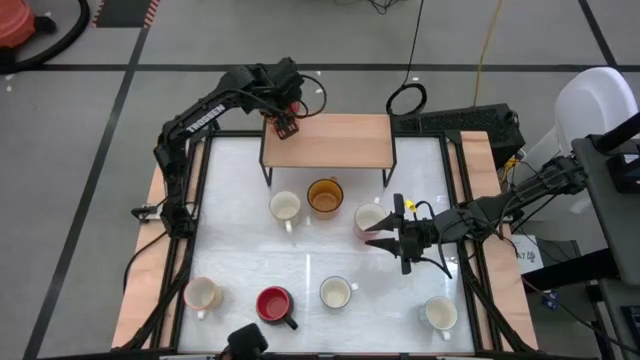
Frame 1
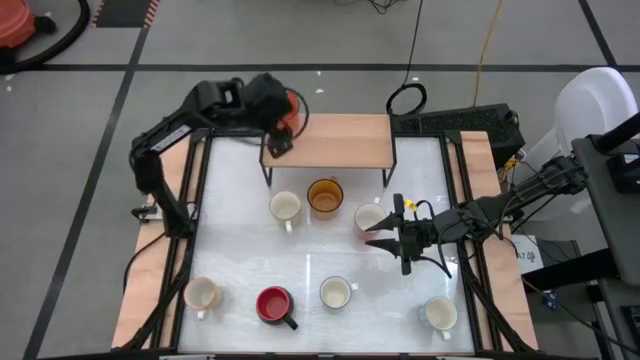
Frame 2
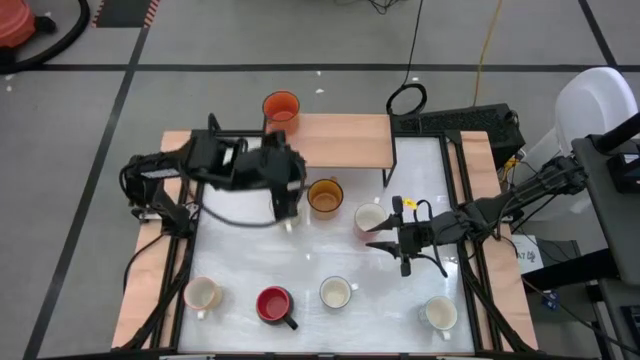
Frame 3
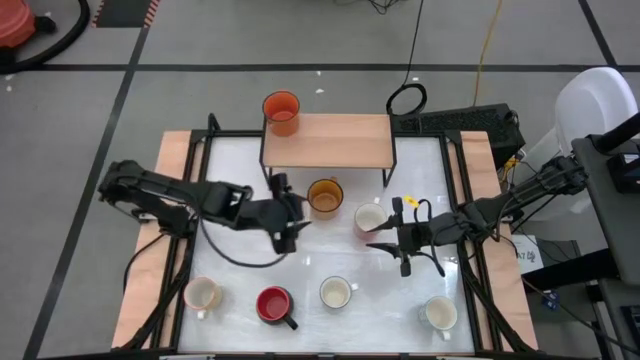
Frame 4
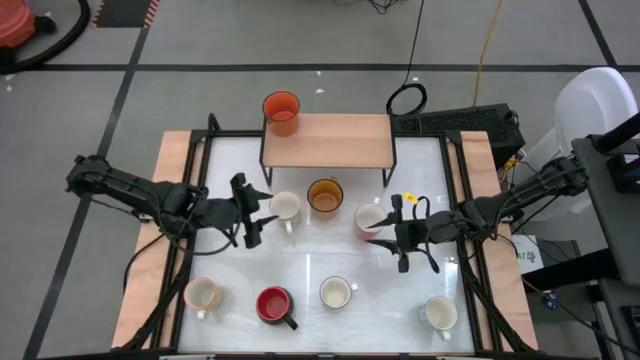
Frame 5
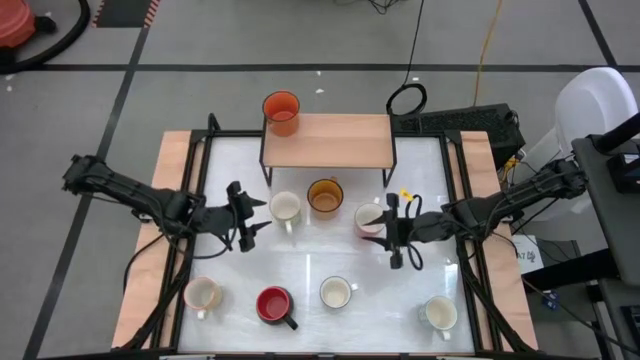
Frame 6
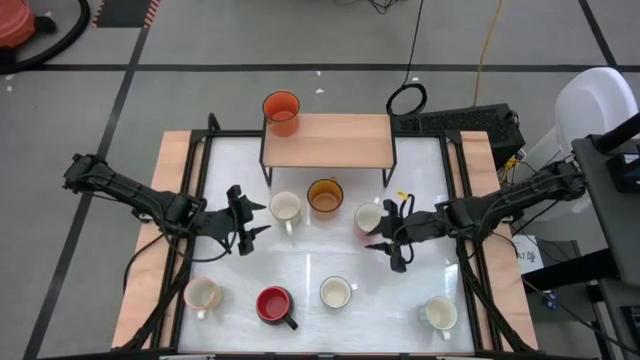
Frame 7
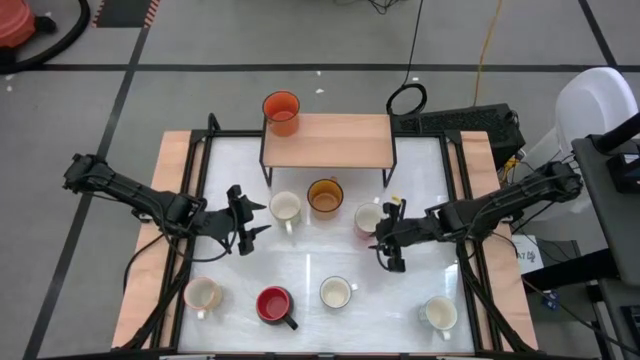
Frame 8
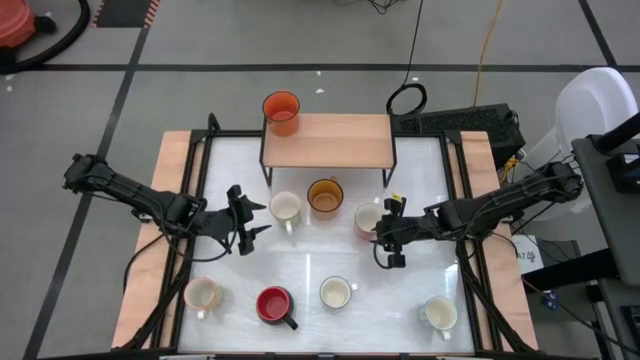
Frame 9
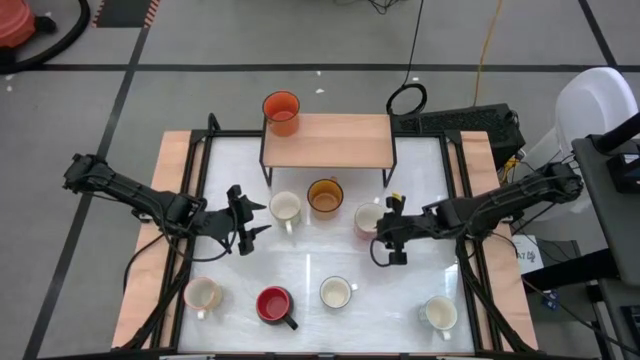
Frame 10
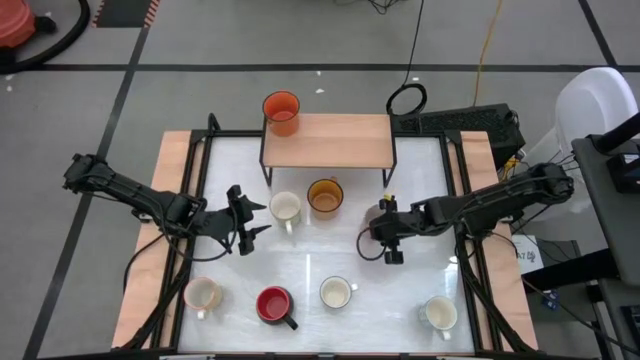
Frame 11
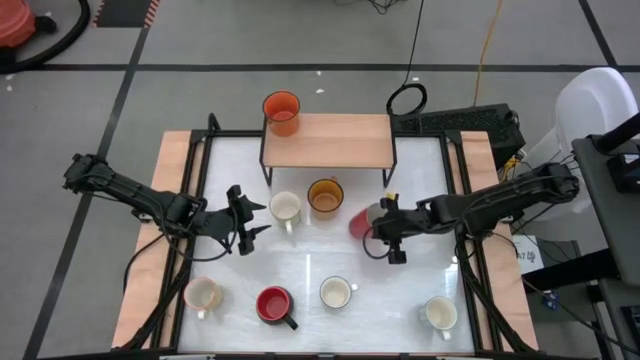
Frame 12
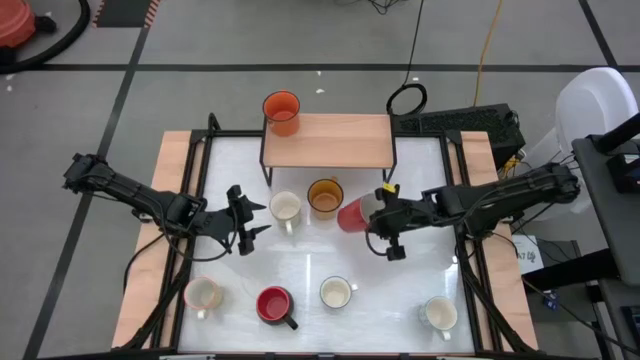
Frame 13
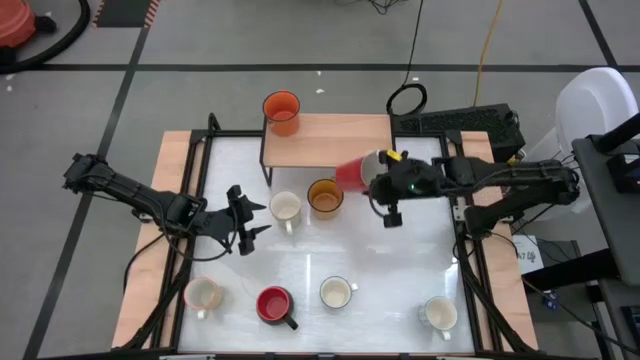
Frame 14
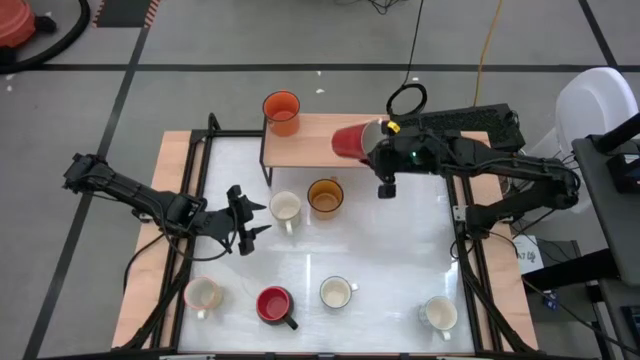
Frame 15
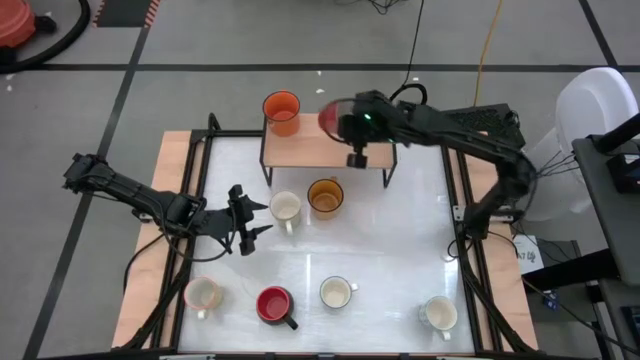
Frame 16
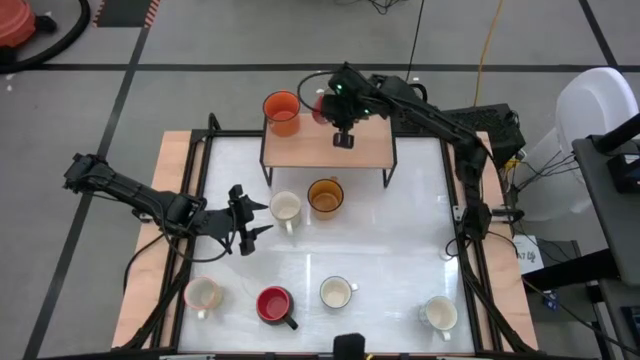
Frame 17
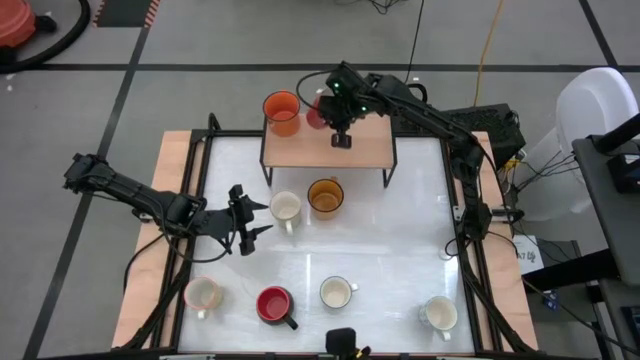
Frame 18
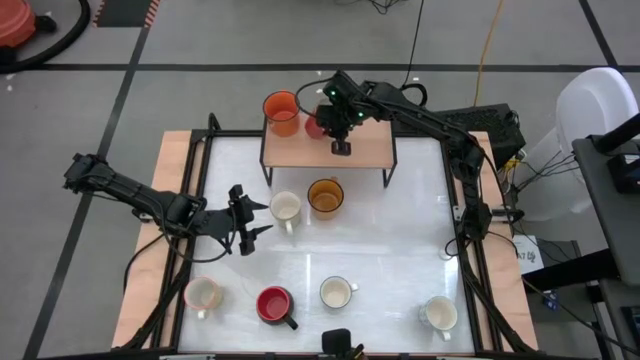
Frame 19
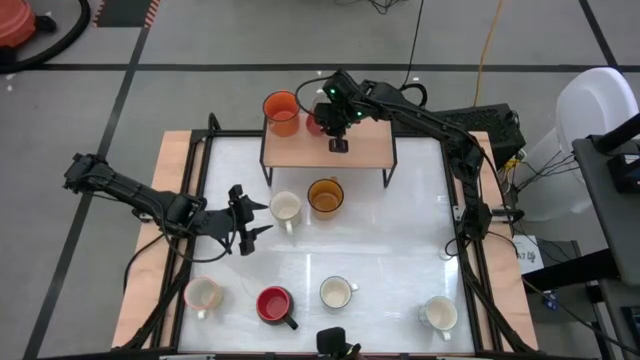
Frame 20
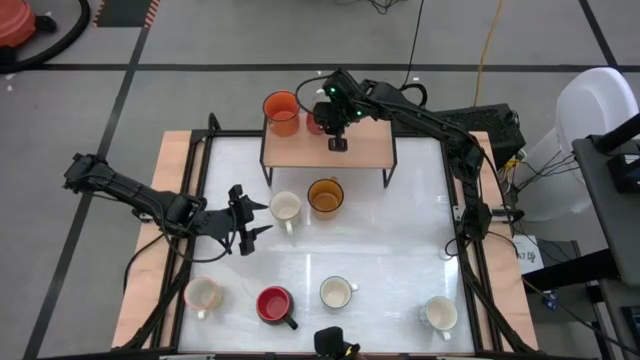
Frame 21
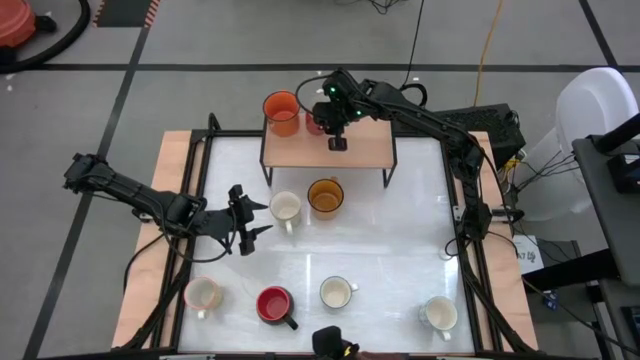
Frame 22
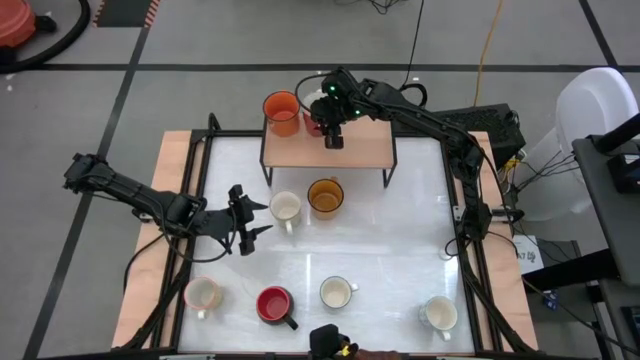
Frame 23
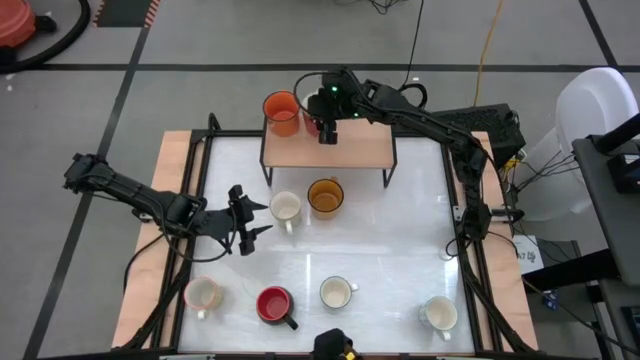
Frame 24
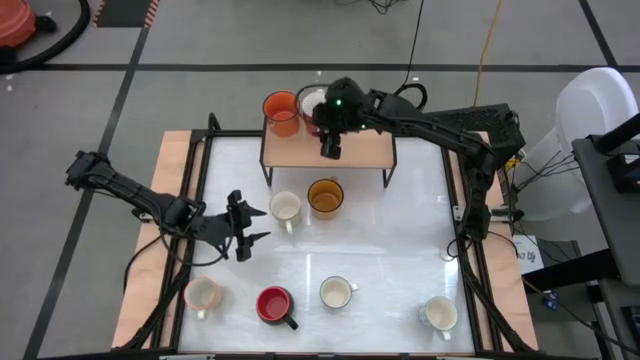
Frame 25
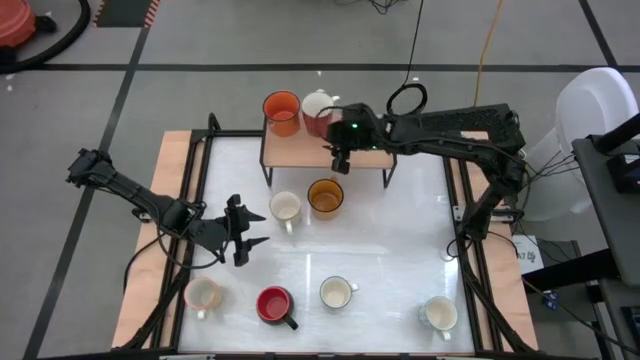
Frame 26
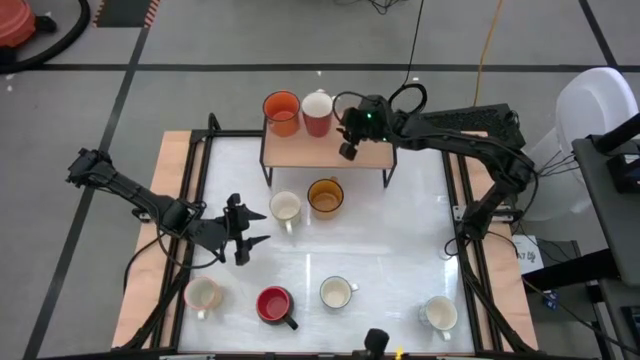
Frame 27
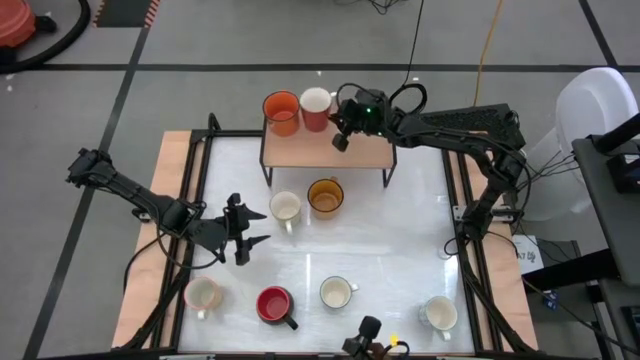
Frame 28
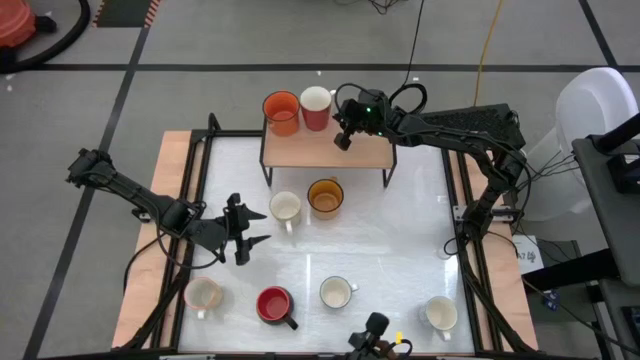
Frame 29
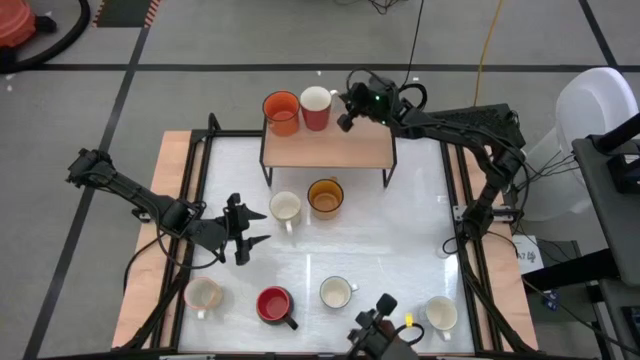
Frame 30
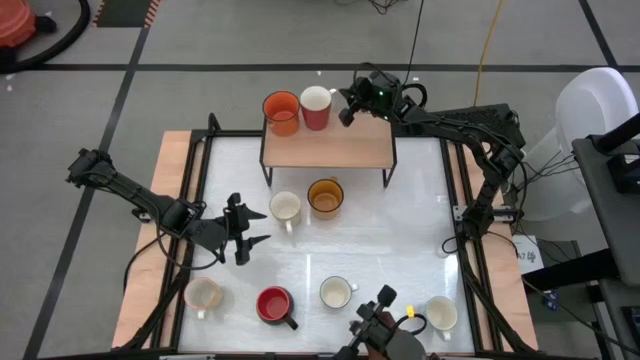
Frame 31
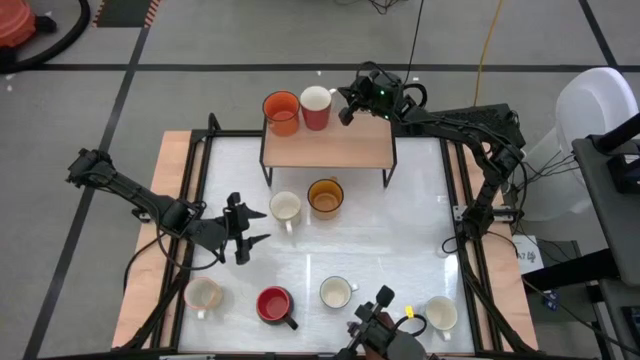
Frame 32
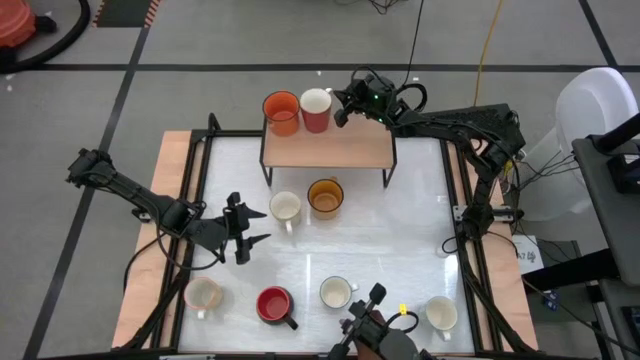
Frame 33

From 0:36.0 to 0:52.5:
Task: Place coffee mugs
Put the red mug on the shelf

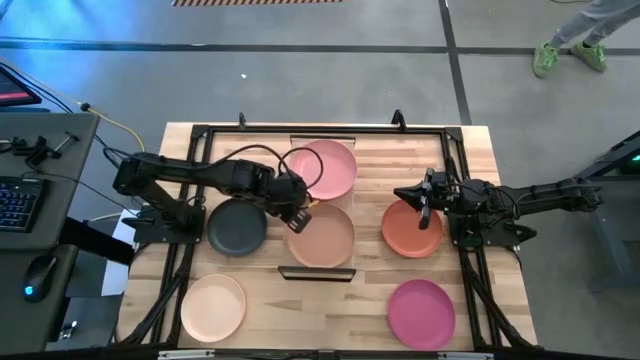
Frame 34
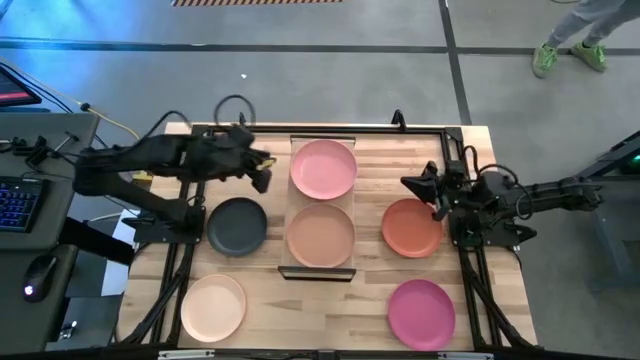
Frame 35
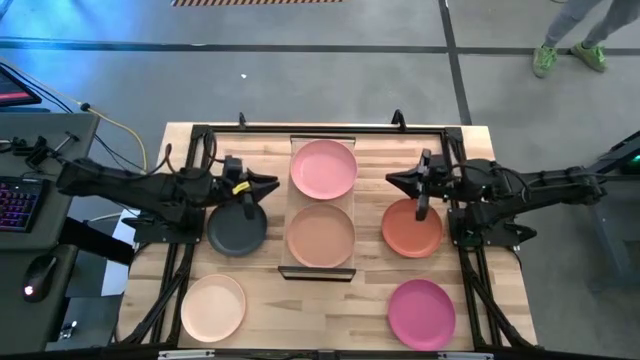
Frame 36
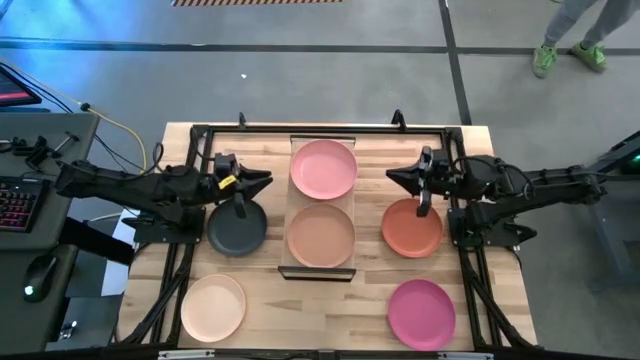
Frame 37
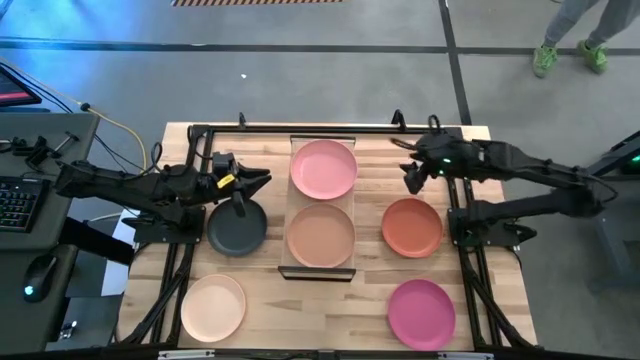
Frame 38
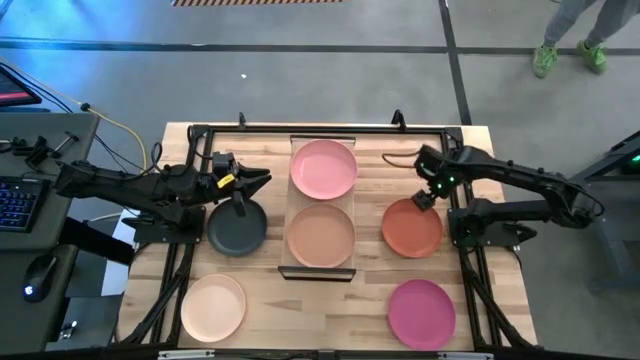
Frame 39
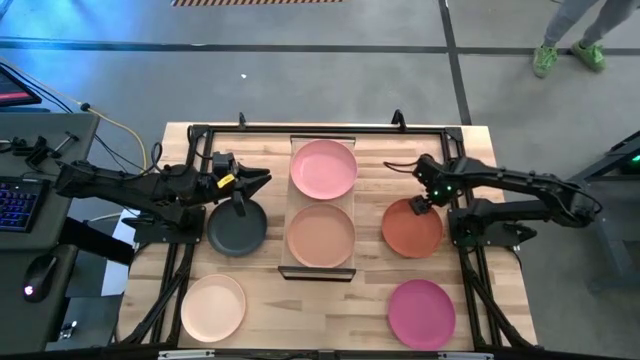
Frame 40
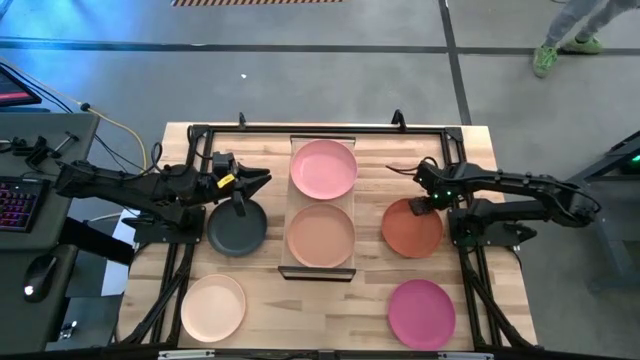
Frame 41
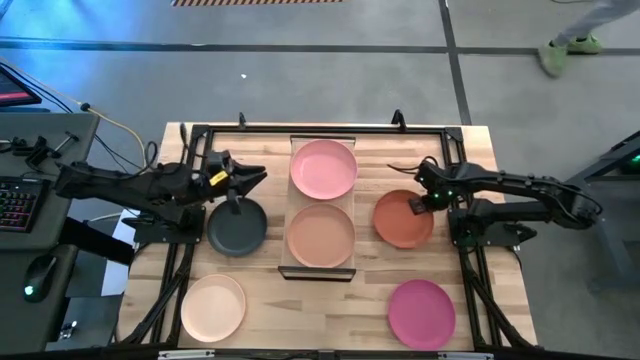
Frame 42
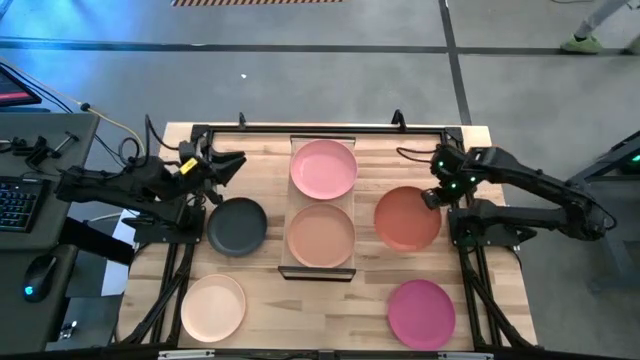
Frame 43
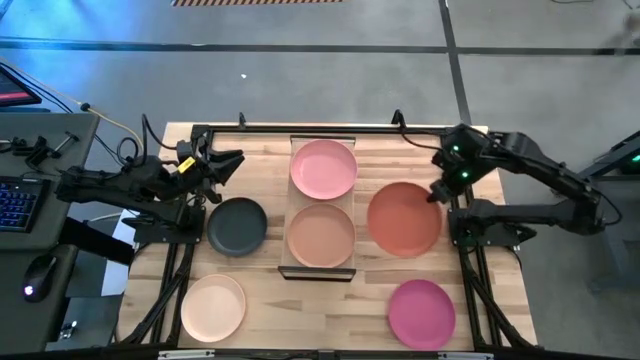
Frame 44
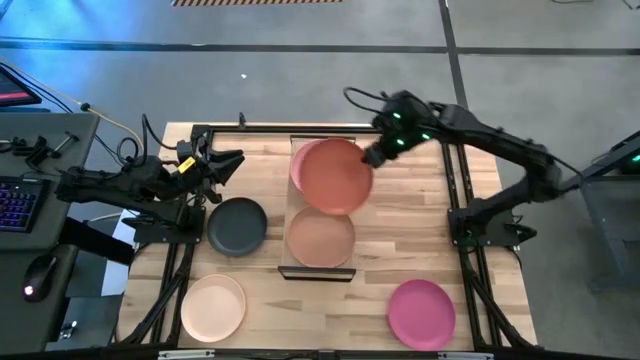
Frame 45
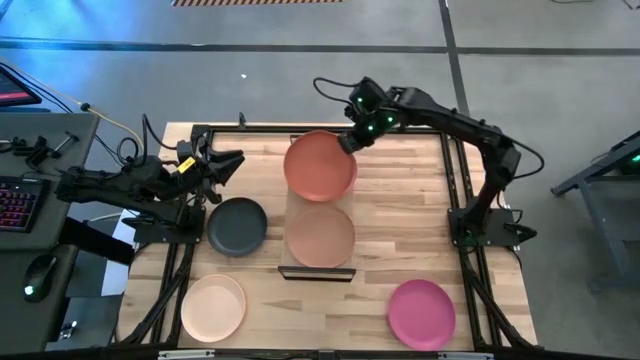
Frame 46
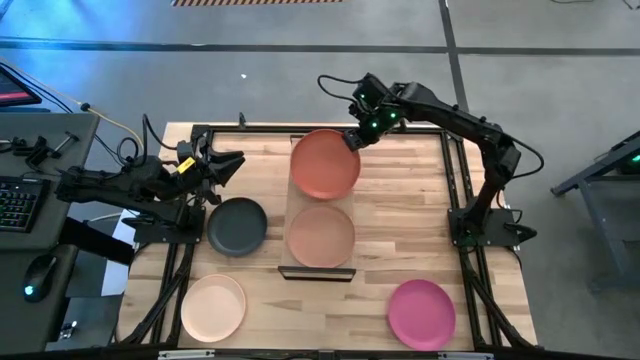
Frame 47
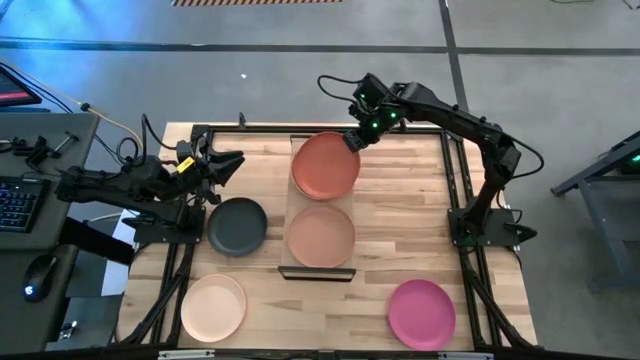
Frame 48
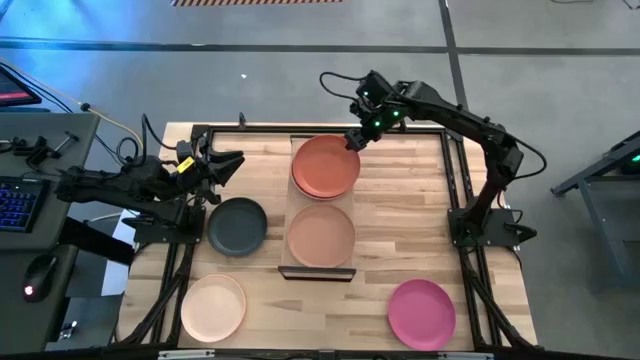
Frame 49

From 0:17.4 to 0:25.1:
Task: Place and stack plates onto a shelf
Stack the orange plate on top of the light pink plate on the shelf
